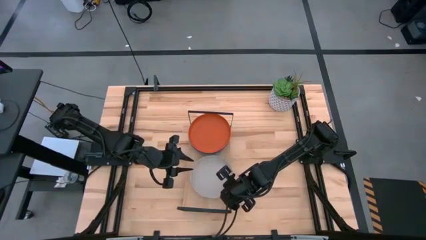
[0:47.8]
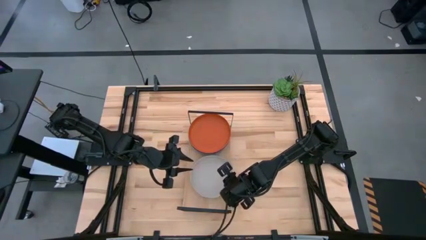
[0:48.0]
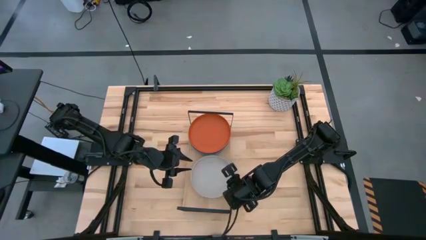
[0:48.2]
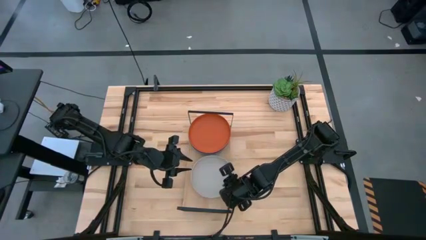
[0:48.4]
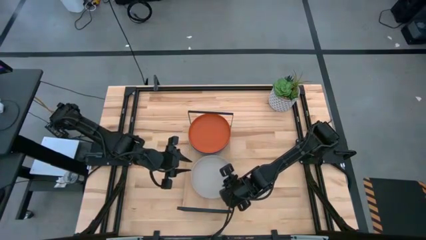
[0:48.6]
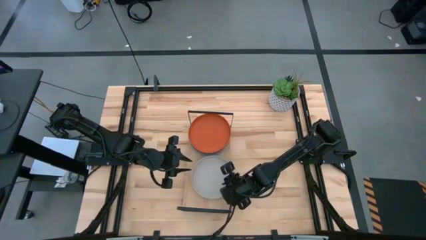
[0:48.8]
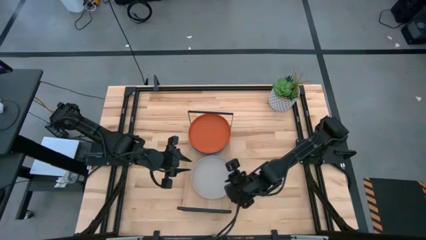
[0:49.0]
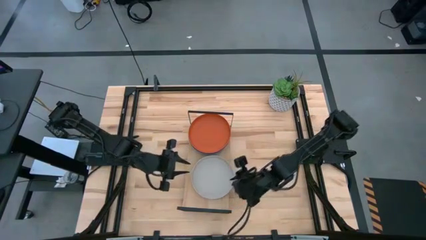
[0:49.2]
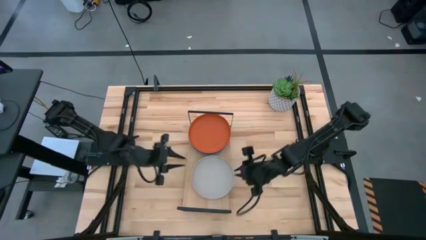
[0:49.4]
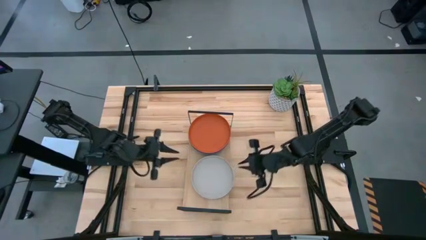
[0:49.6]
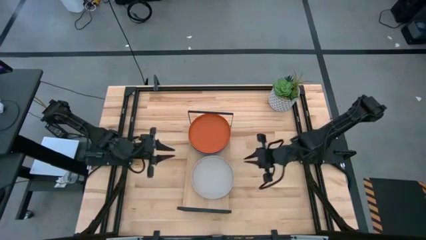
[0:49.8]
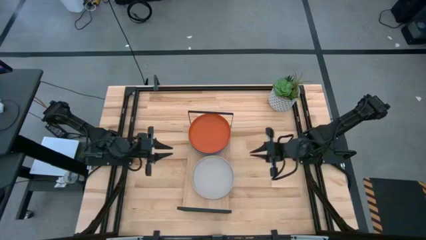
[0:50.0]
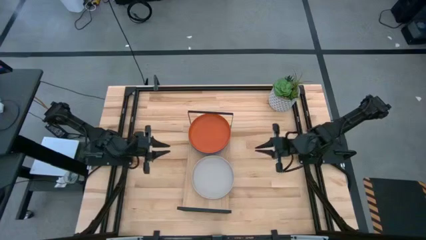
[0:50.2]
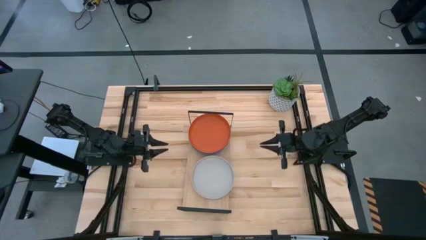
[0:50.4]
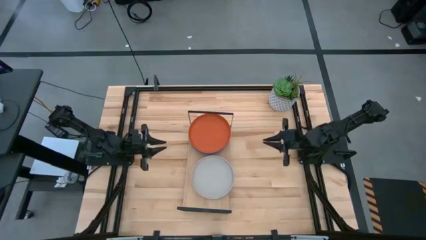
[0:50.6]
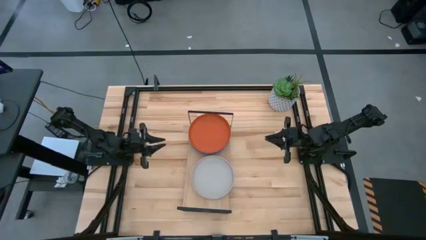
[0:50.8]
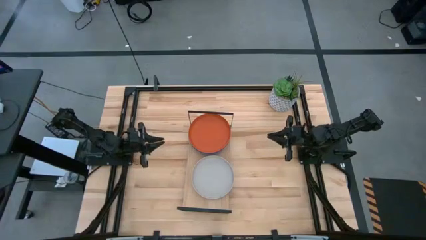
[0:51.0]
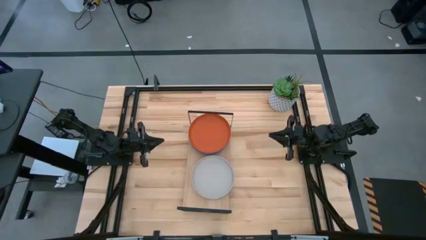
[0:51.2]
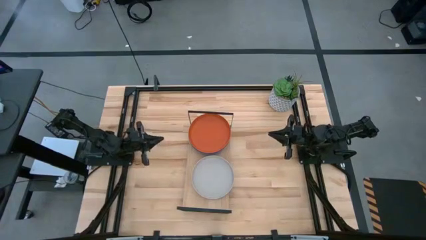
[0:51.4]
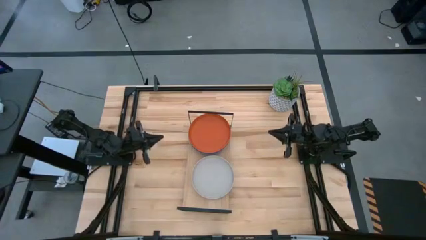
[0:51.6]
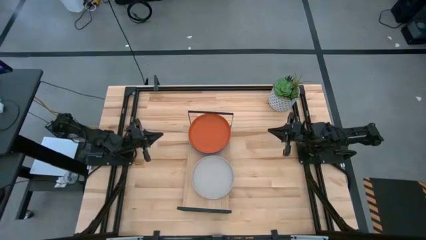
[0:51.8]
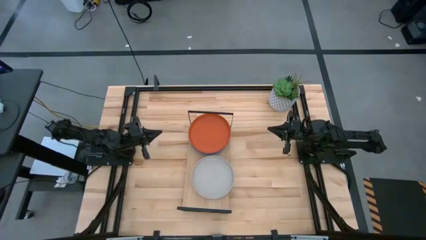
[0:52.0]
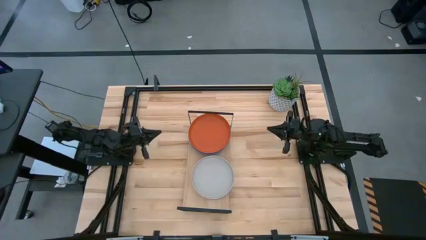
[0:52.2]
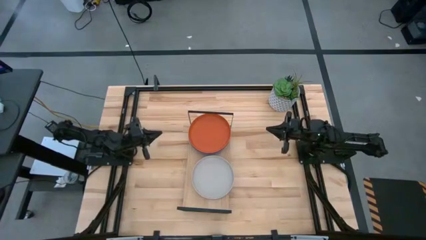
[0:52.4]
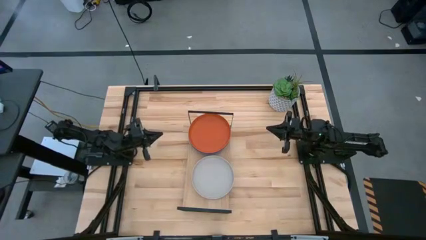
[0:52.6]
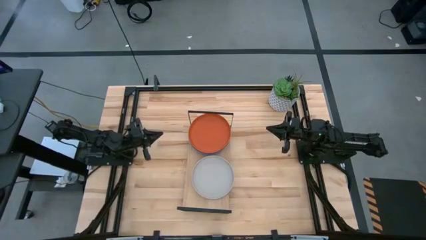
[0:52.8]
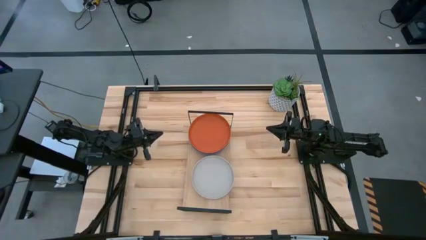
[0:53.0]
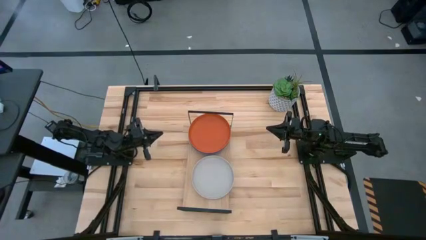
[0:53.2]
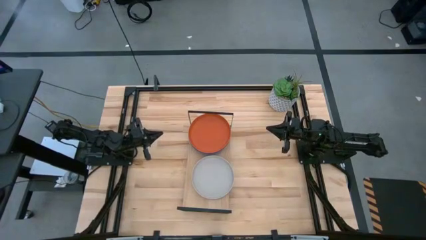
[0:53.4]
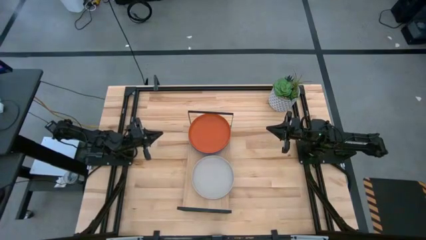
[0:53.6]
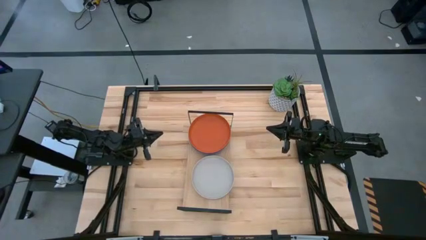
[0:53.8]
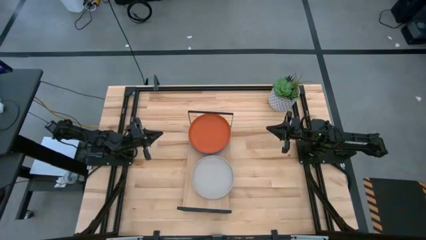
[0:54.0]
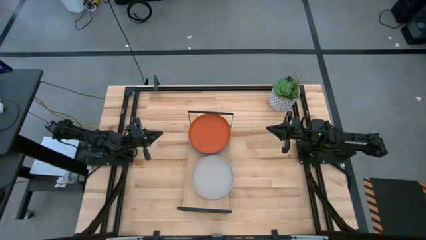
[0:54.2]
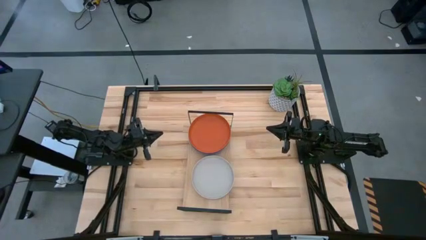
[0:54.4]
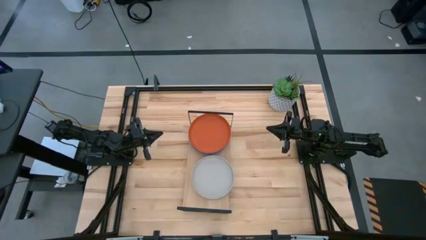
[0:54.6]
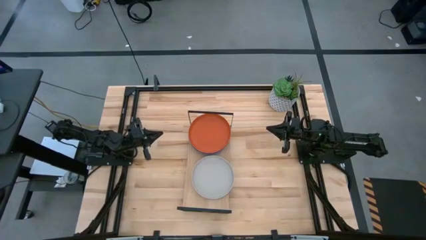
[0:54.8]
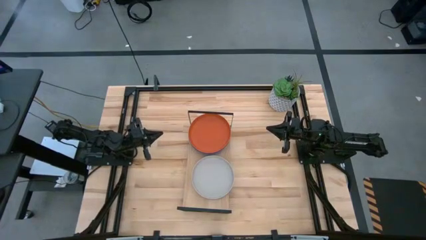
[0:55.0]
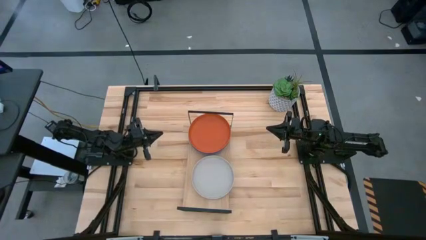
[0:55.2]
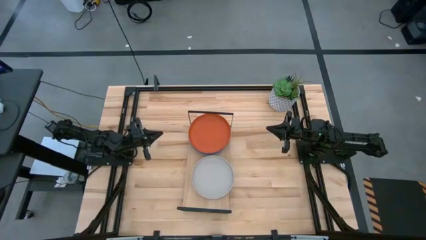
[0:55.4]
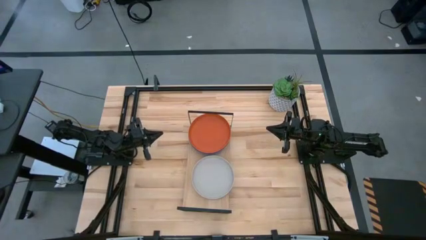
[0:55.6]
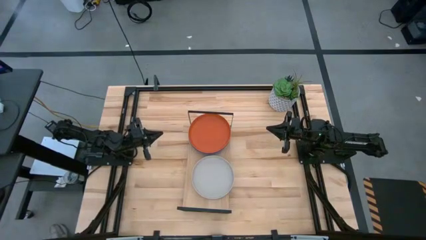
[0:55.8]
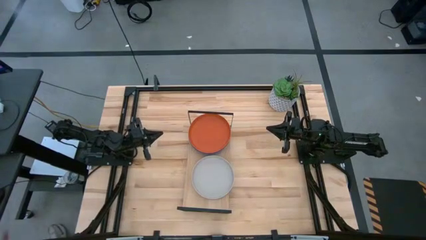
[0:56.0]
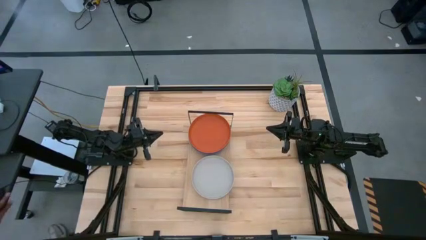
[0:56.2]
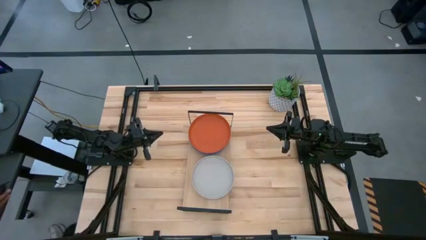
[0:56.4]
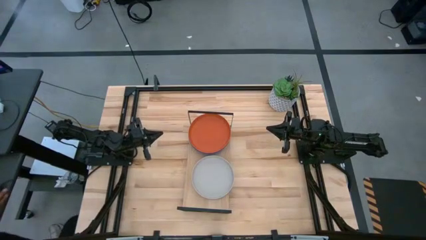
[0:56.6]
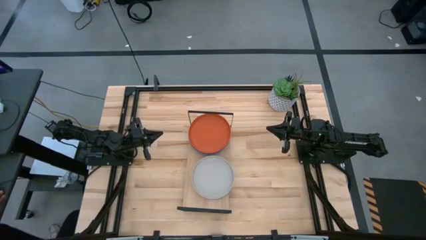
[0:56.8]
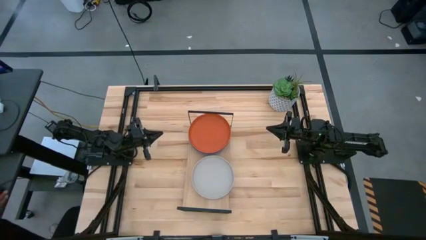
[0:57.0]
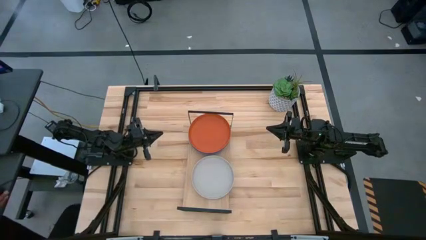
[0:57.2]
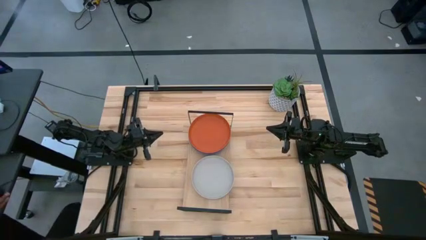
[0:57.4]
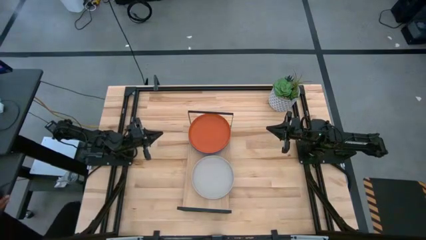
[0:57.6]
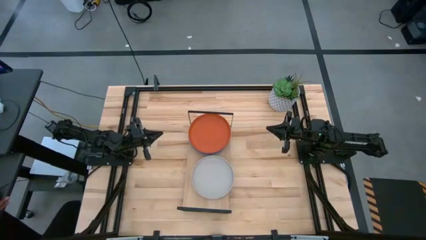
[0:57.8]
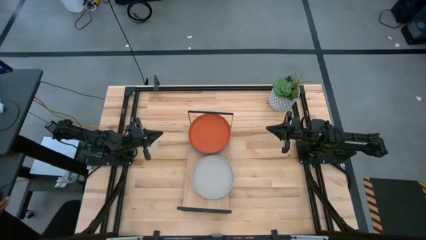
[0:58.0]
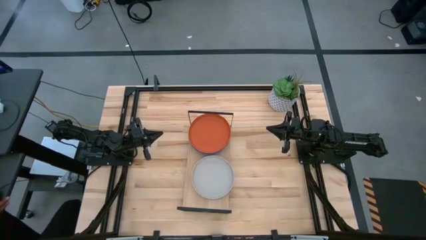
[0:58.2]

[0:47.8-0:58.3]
Task: Place and stack plates onto a shelf
Return to Home Position

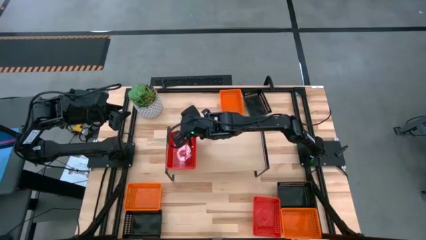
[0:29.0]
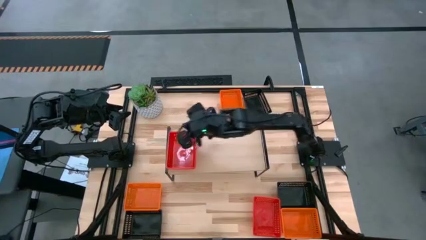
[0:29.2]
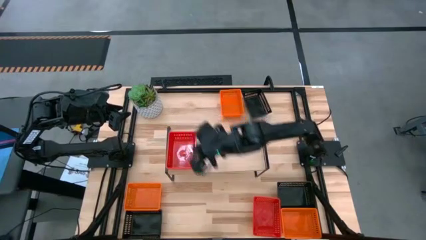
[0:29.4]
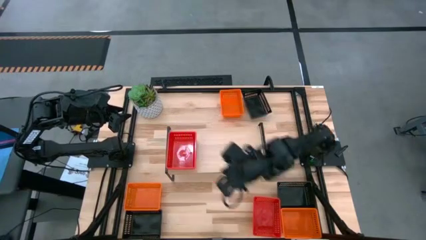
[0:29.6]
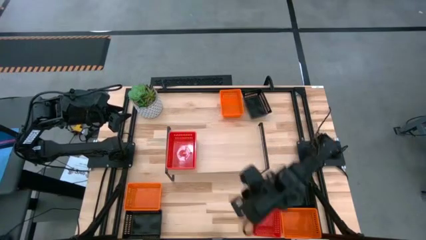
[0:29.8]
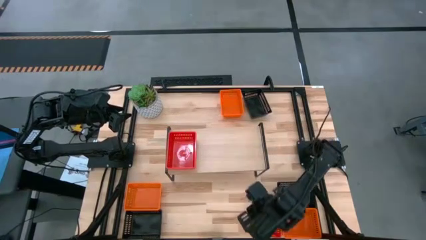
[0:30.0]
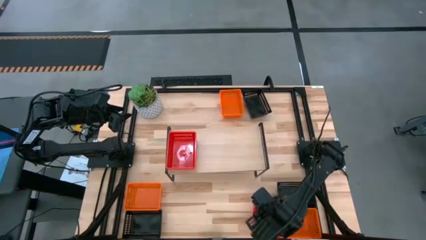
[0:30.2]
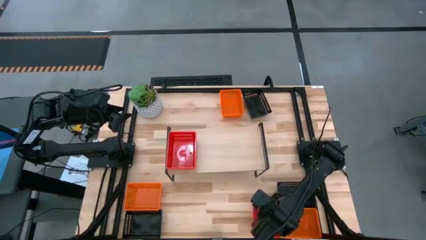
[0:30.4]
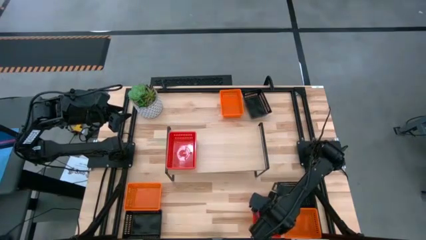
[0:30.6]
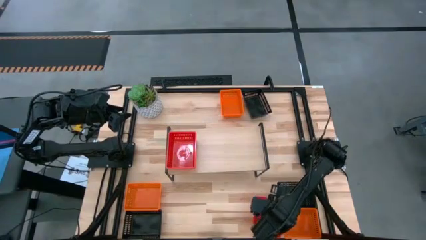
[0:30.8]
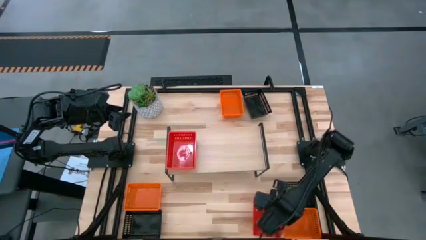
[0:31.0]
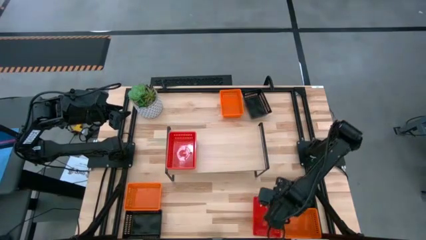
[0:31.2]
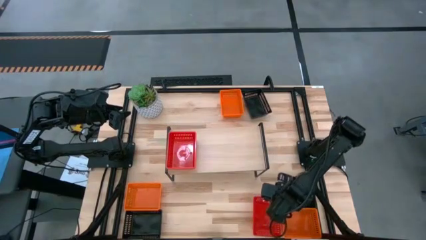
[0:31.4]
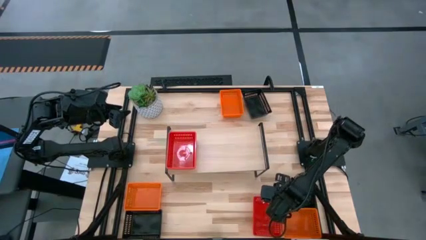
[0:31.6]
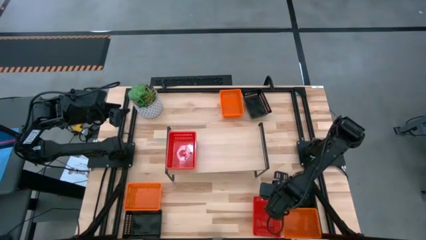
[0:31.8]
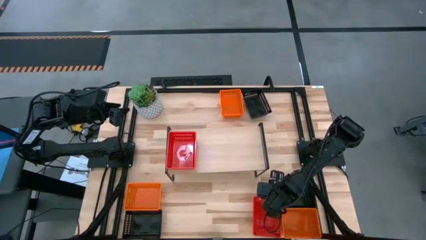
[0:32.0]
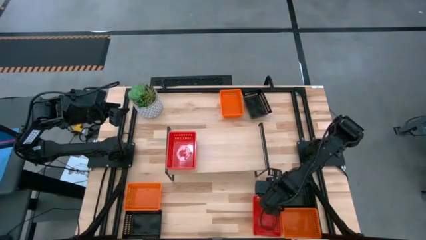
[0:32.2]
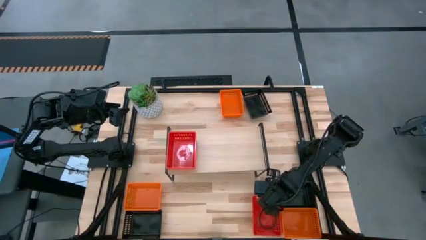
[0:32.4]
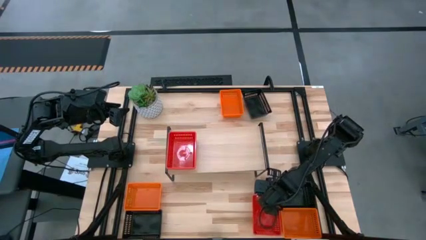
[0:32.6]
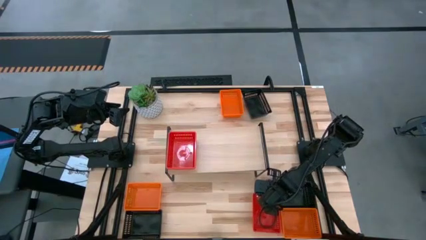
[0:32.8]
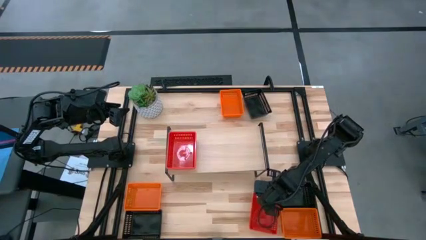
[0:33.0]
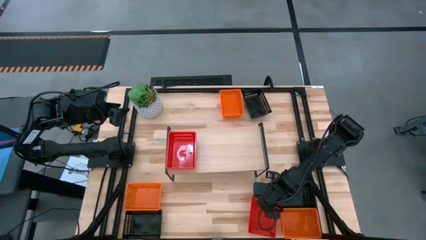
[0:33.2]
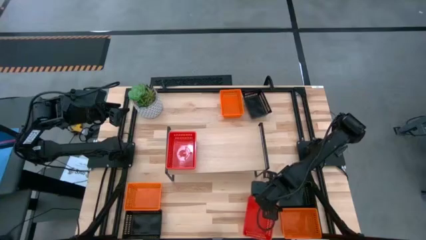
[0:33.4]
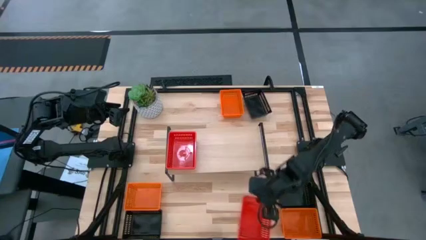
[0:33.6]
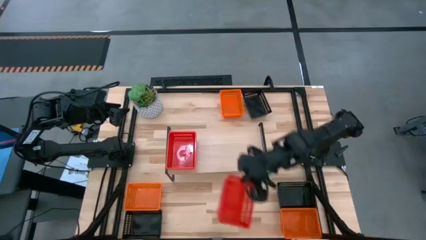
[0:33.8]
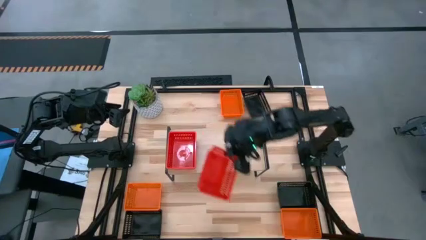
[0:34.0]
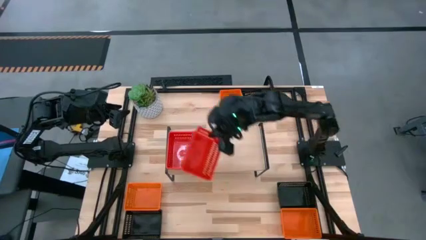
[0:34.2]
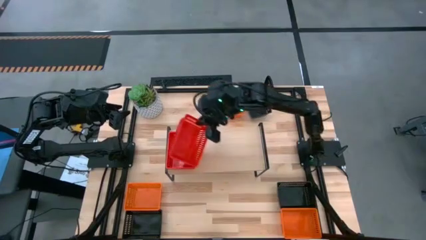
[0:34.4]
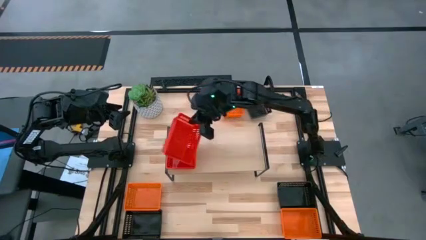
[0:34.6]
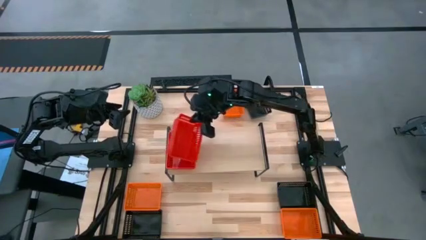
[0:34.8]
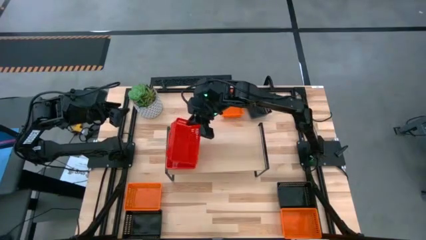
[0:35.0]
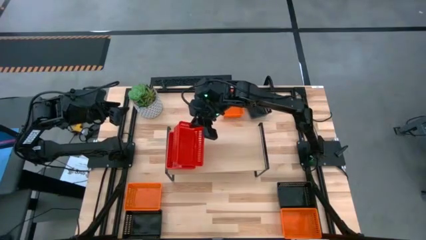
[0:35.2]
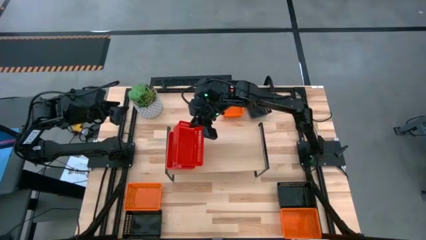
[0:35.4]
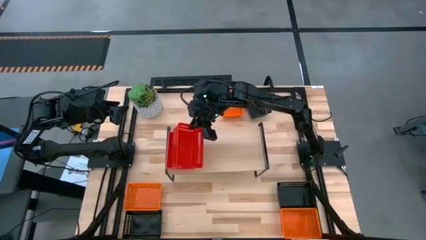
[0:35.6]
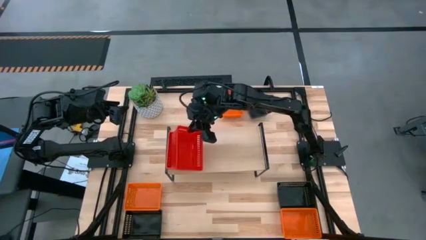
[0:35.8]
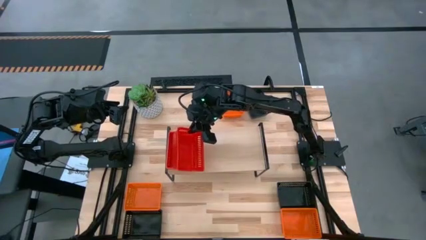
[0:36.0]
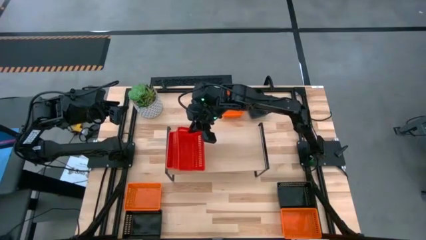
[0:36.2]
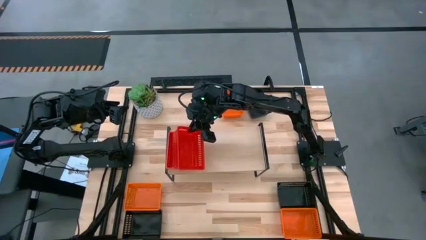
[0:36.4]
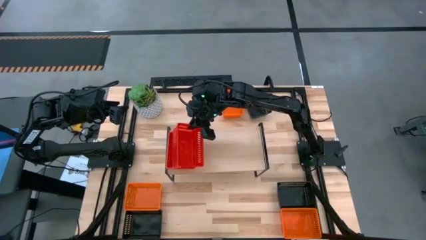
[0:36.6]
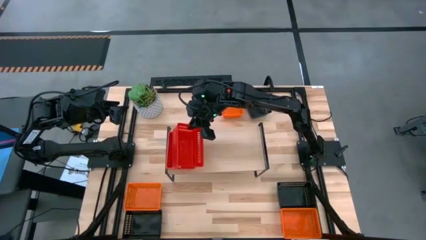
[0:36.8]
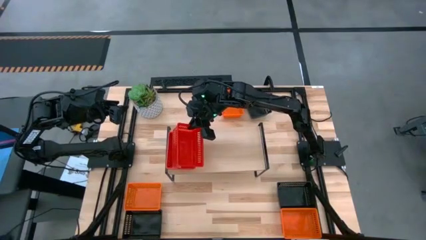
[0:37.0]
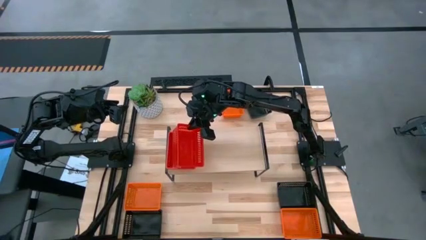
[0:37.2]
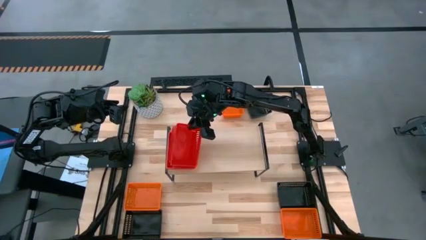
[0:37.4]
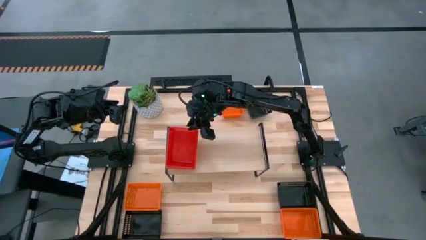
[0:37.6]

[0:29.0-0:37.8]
Task: Stack baskets on shelf by color
Stack the red bin on top of the other red bins on the shelf
